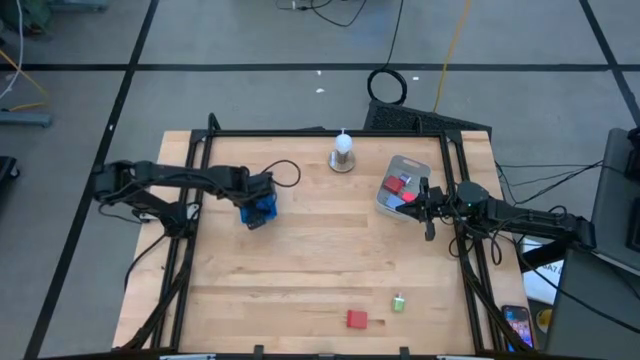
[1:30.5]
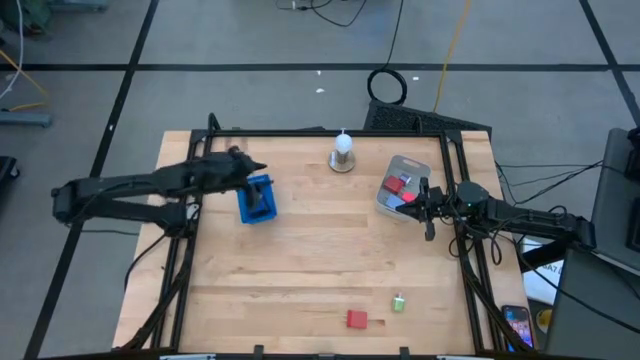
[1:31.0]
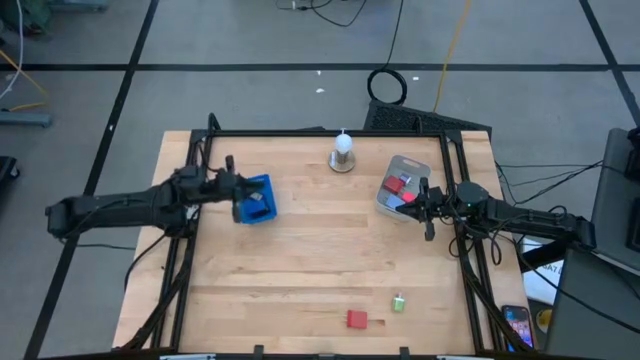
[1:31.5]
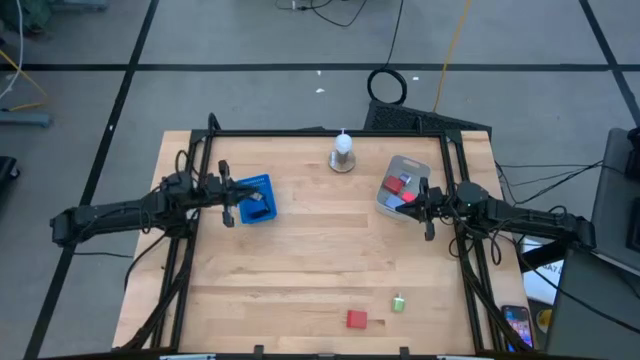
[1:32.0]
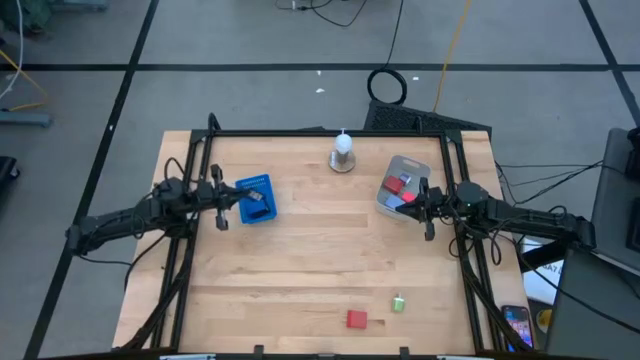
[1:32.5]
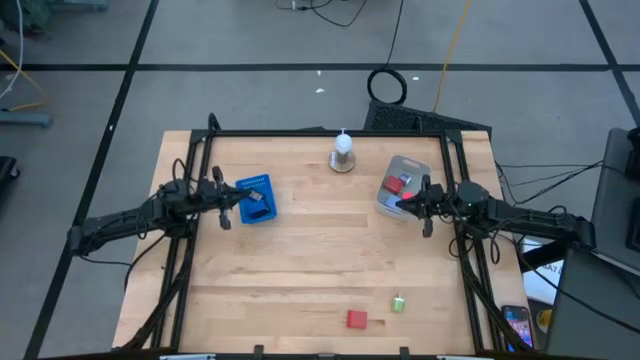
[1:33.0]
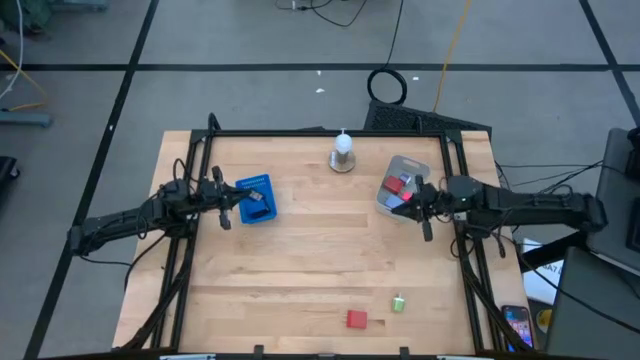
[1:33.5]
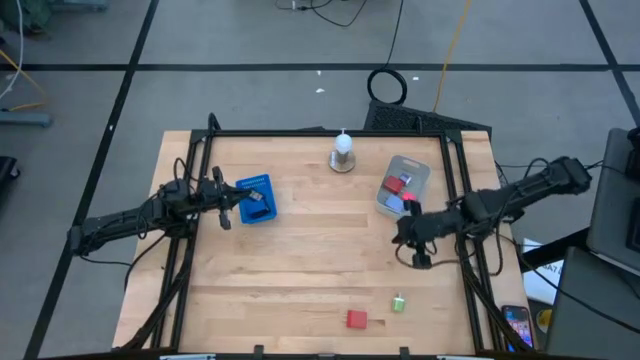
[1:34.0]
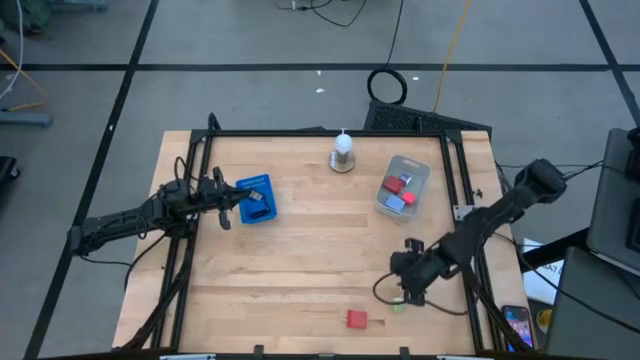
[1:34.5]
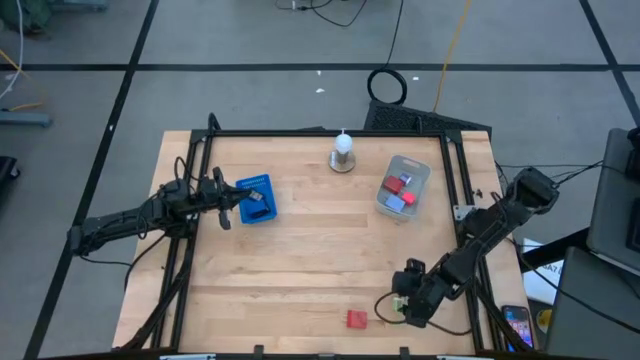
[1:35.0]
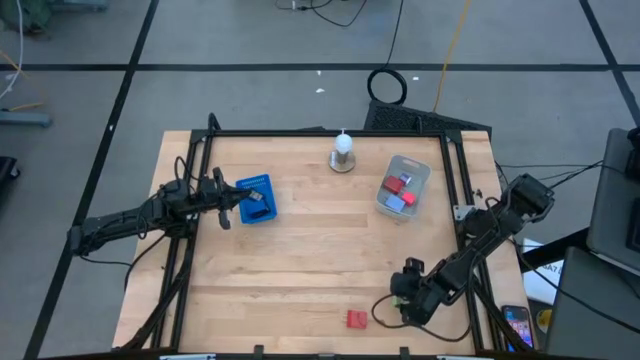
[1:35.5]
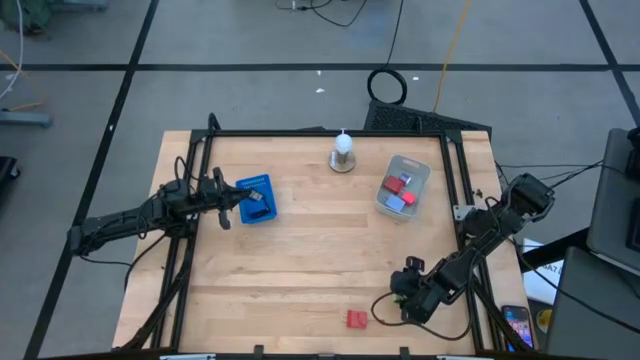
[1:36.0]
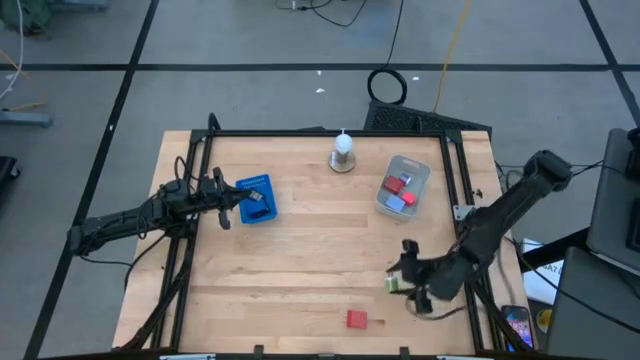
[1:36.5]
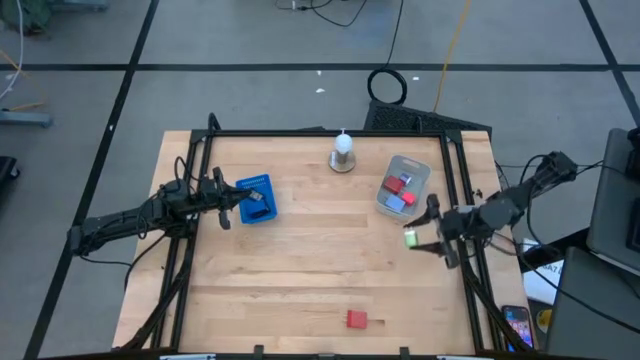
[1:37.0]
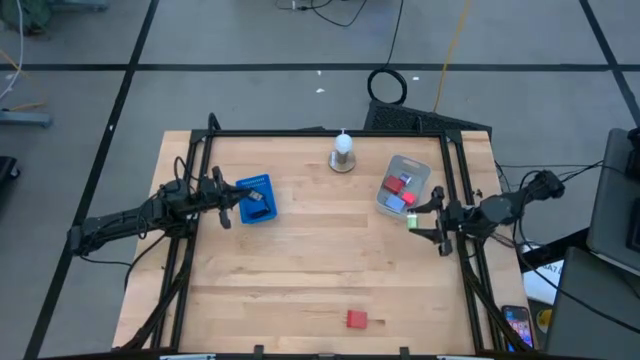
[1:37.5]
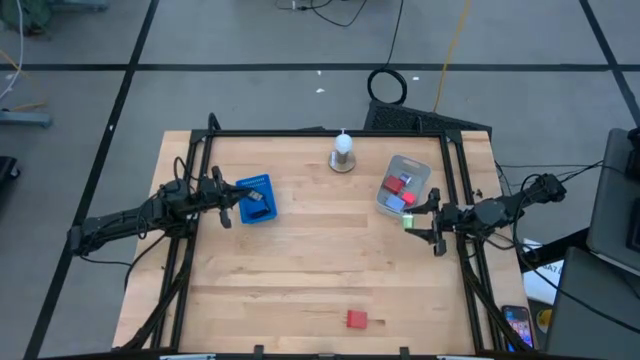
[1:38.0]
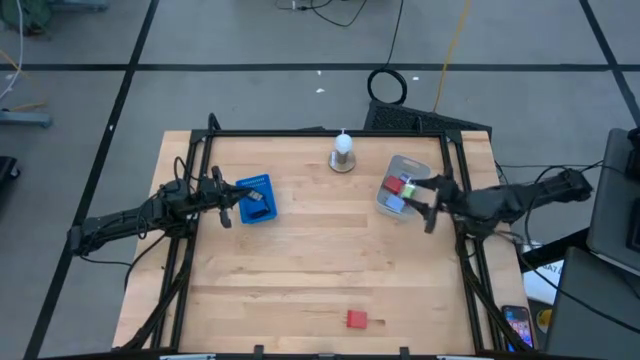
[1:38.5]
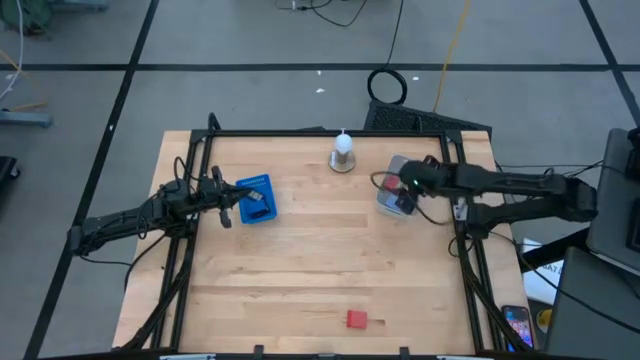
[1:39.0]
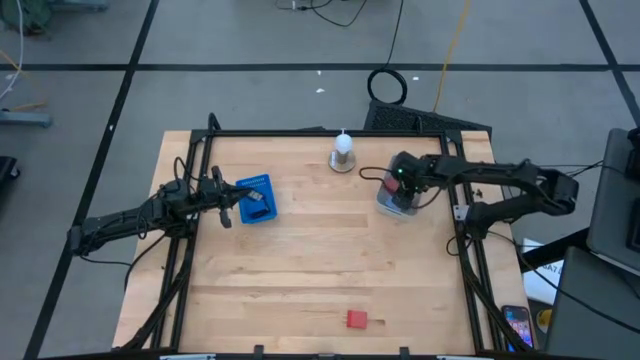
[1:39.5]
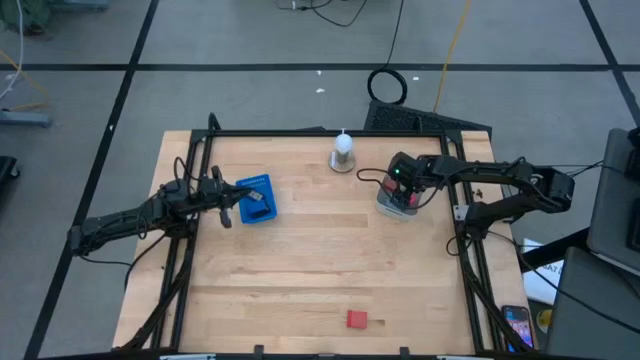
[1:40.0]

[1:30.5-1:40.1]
Task: Pick & Place Office items
Put the green charger adapter into the gray bin

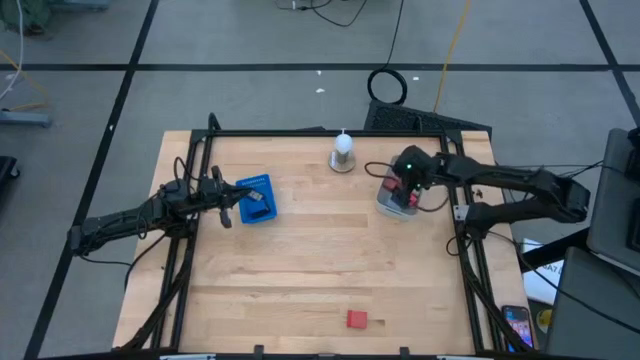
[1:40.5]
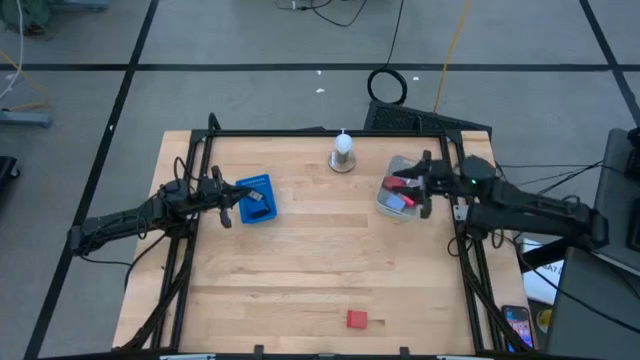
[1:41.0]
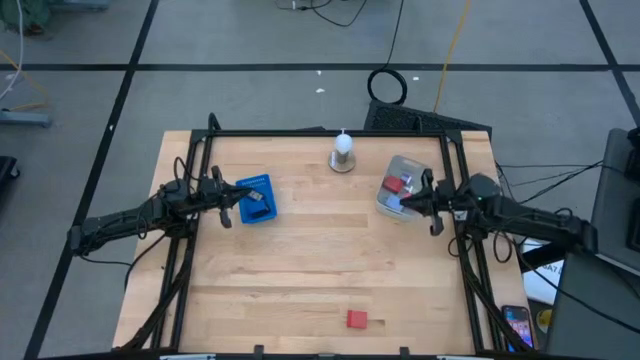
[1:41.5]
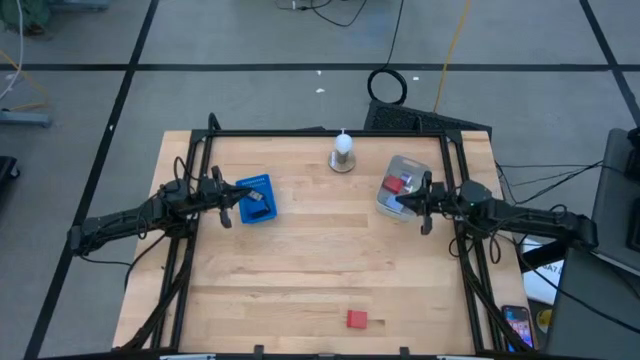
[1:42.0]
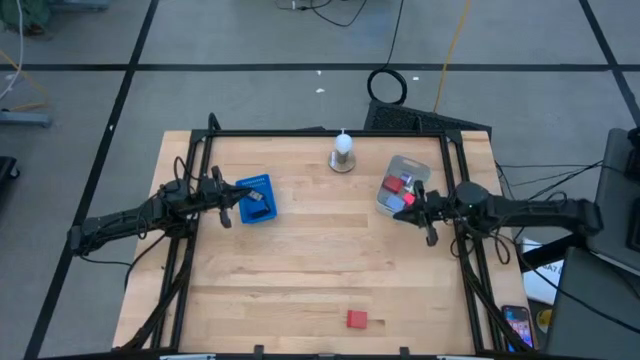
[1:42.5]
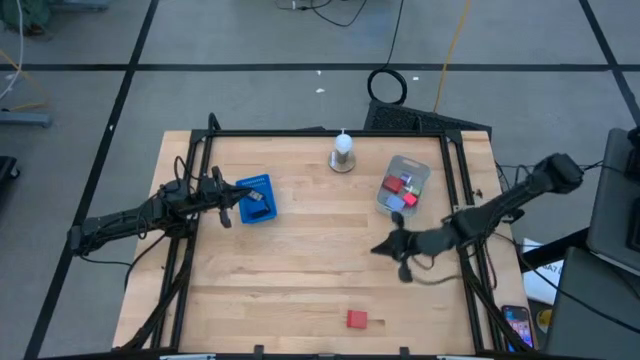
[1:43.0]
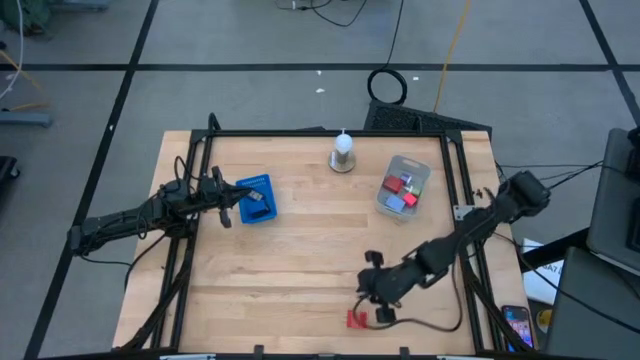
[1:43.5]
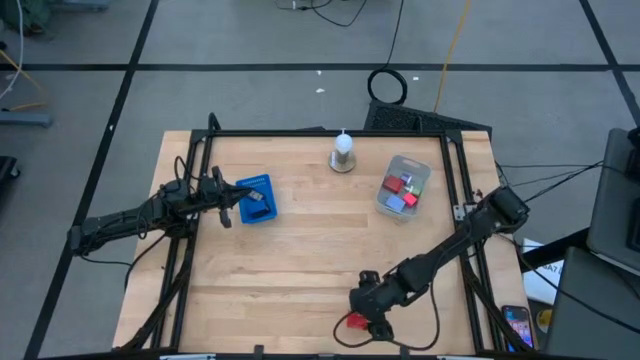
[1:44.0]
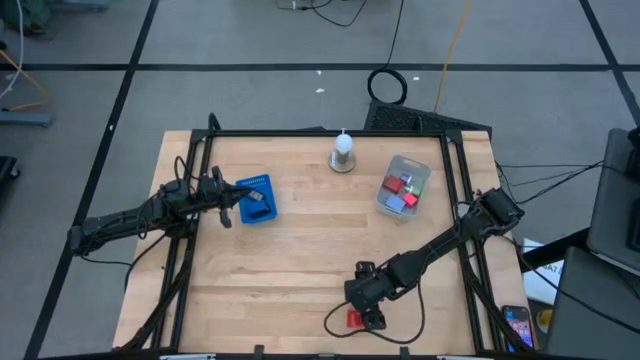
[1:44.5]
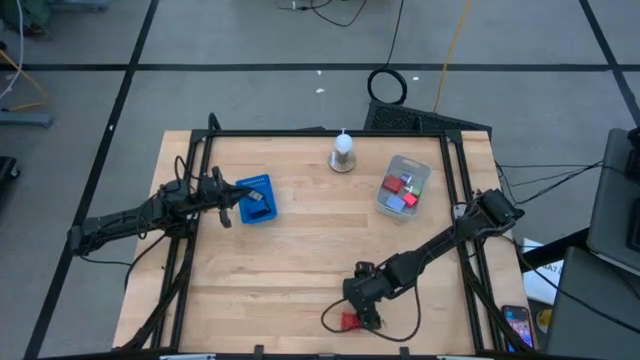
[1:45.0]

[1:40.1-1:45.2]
Put the red charger adapter into the gray bin

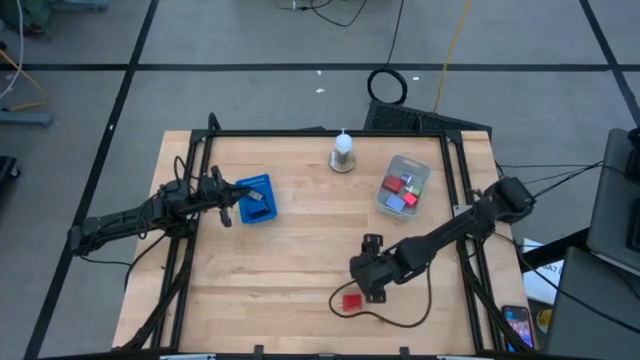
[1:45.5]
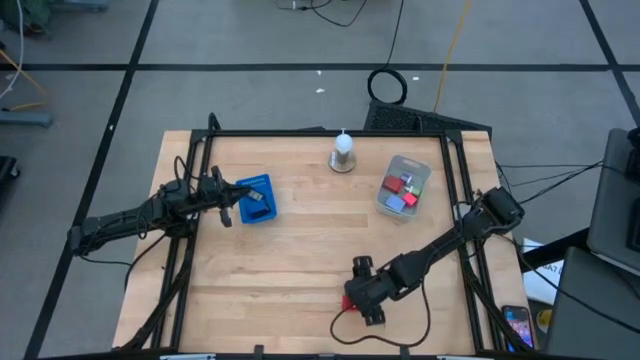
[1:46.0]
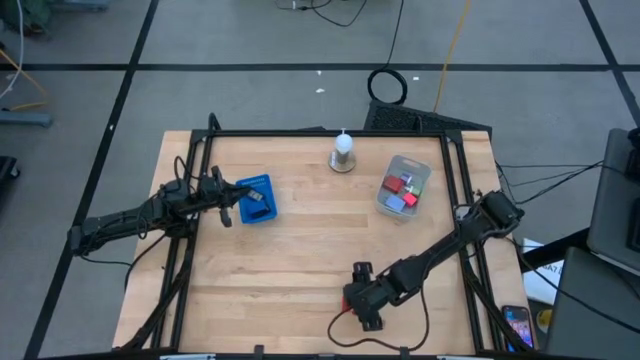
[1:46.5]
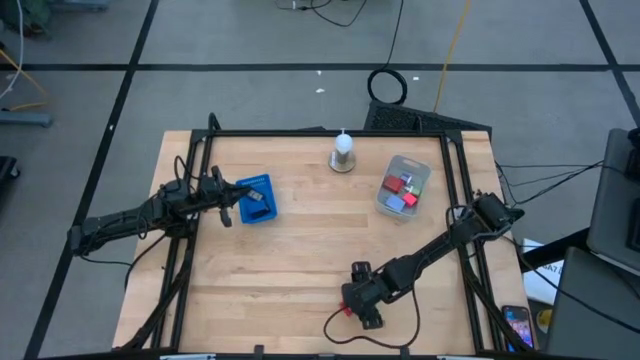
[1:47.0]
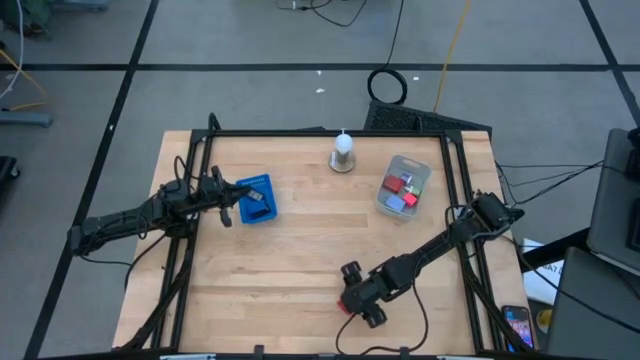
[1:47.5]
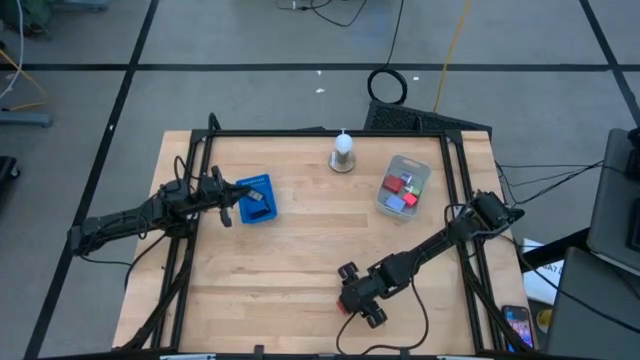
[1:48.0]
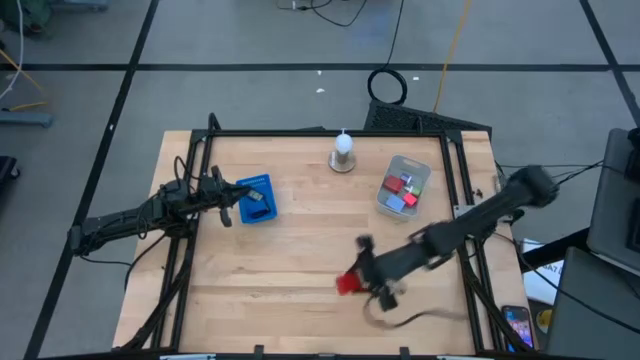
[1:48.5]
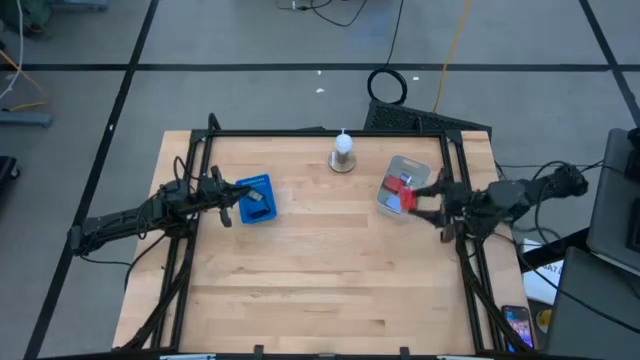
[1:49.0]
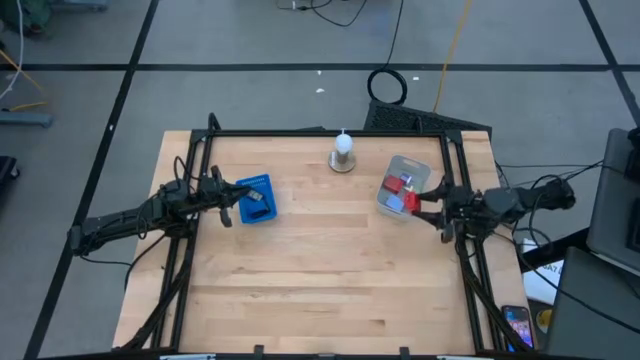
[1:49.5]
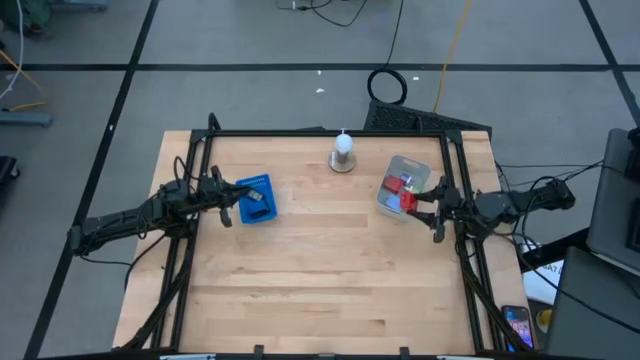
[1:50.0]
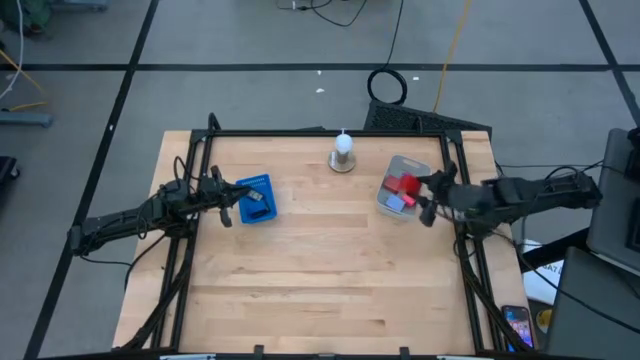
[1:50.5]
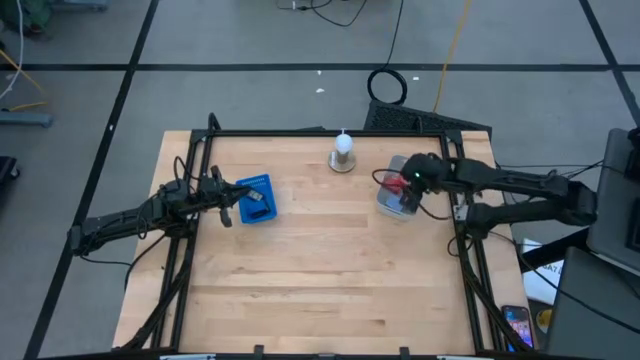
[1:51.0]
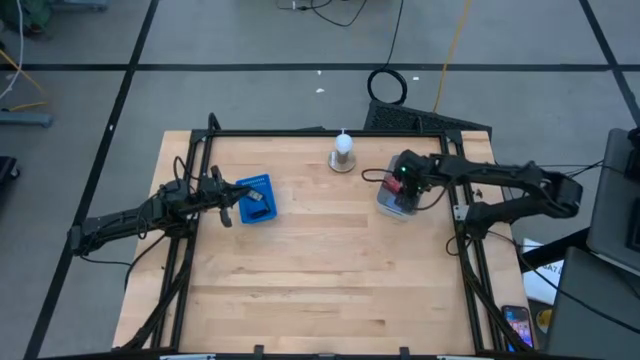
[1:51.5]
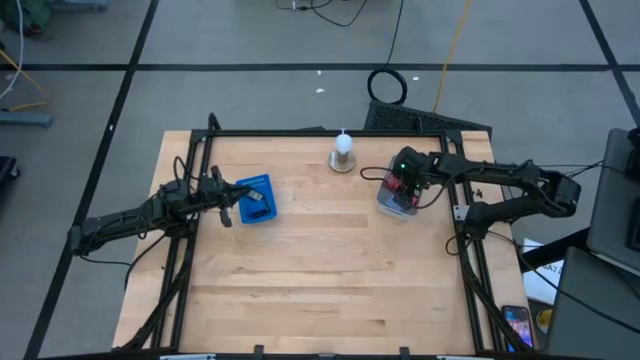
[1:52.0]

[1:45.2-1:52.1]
Put the red charger adapter into the gray bin
